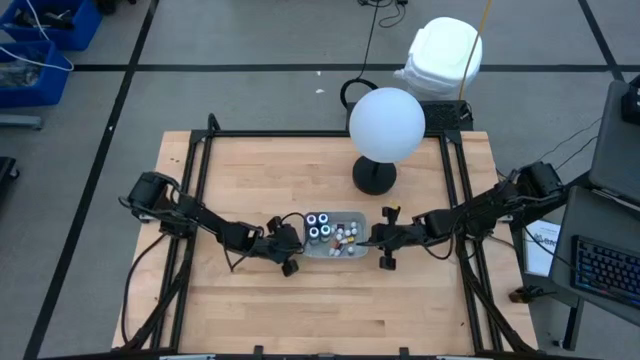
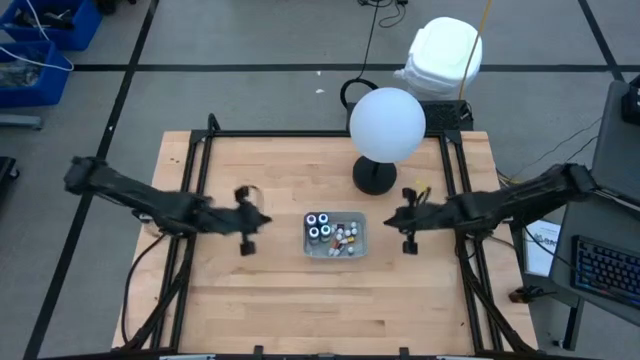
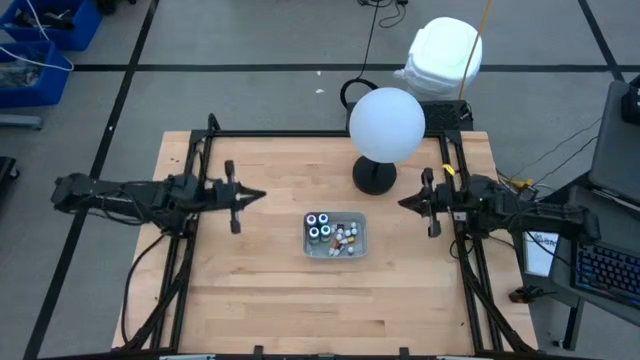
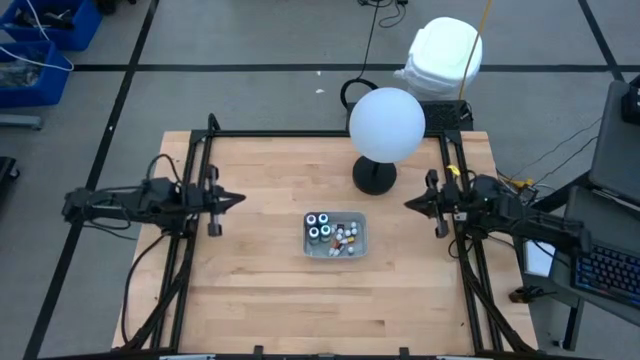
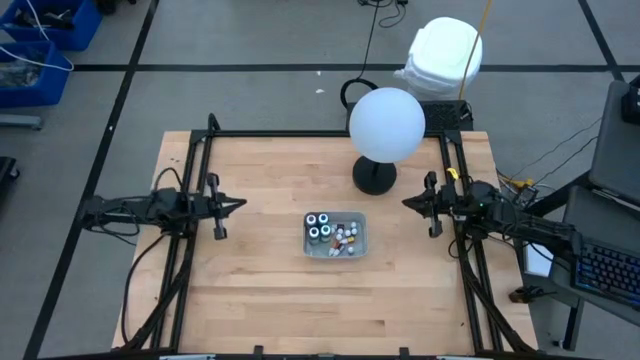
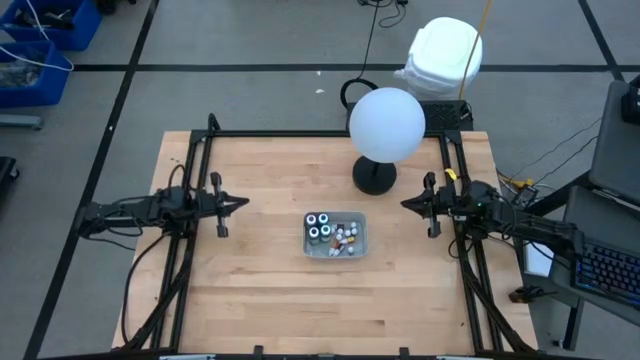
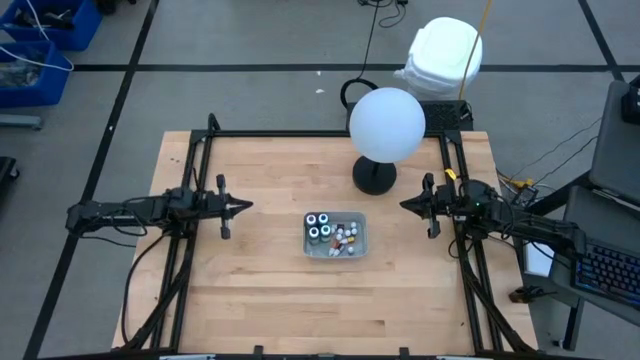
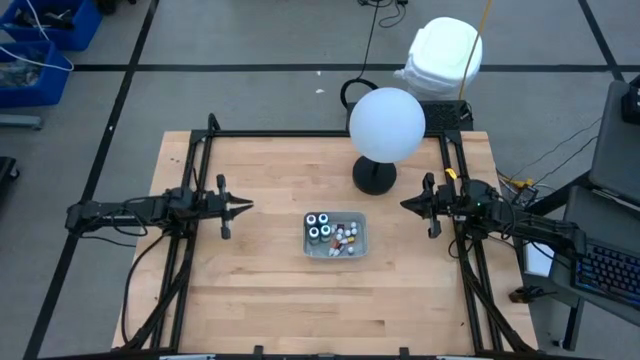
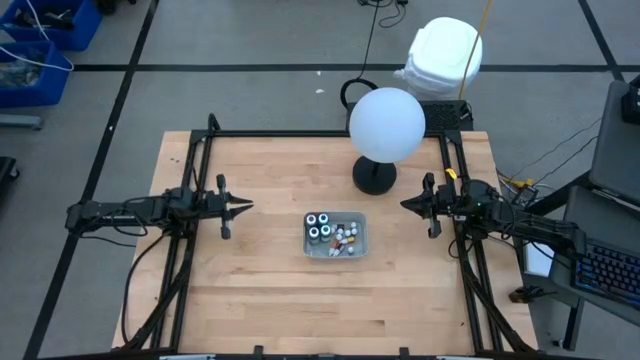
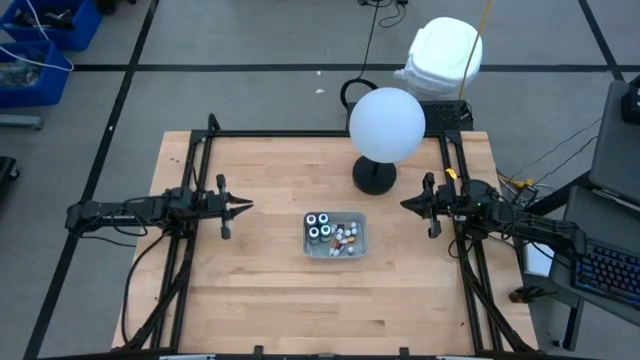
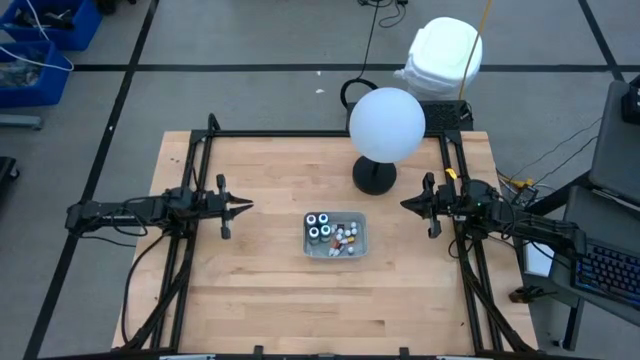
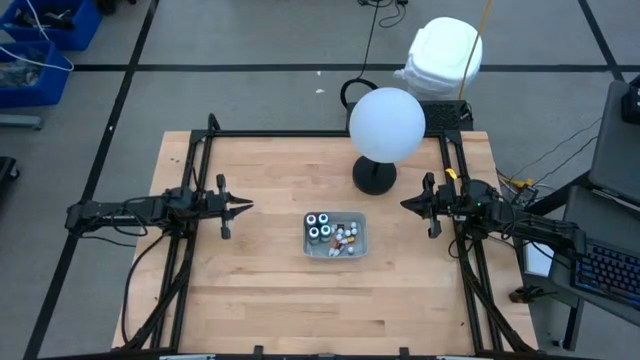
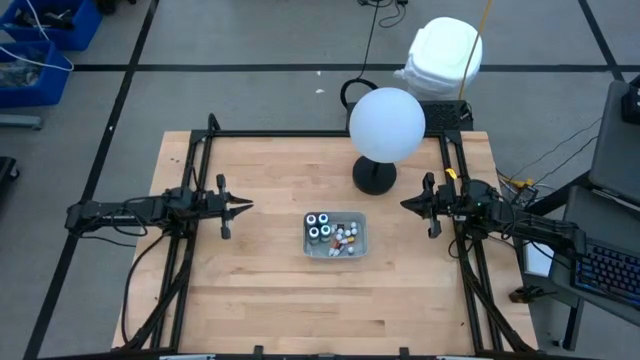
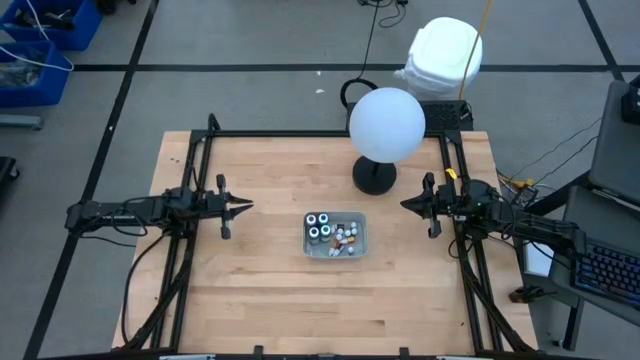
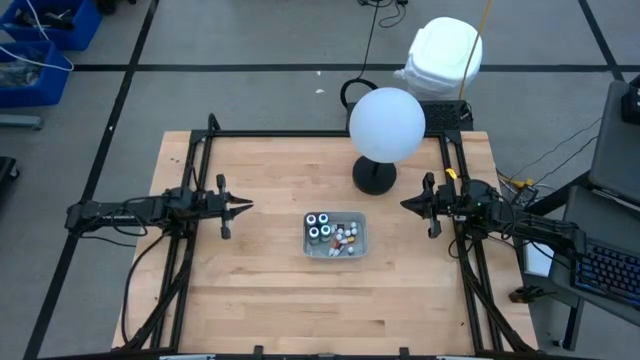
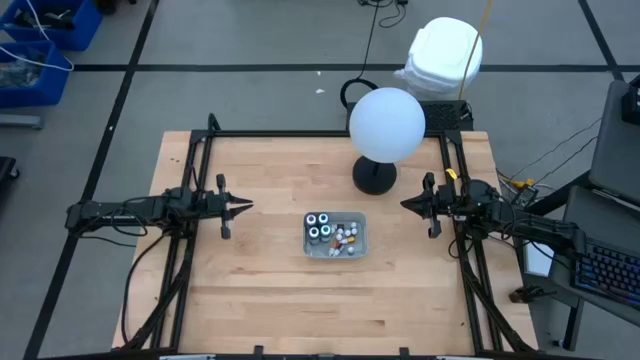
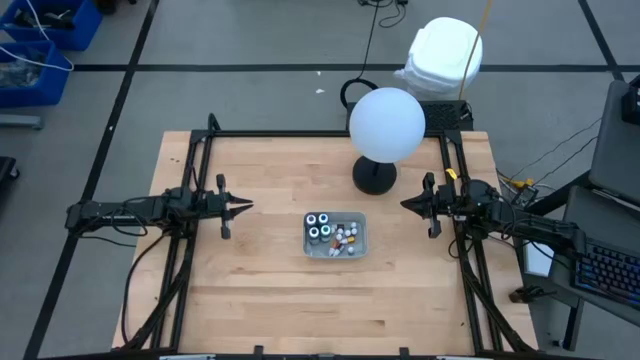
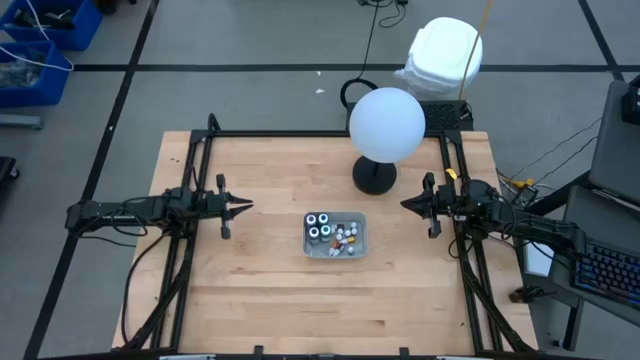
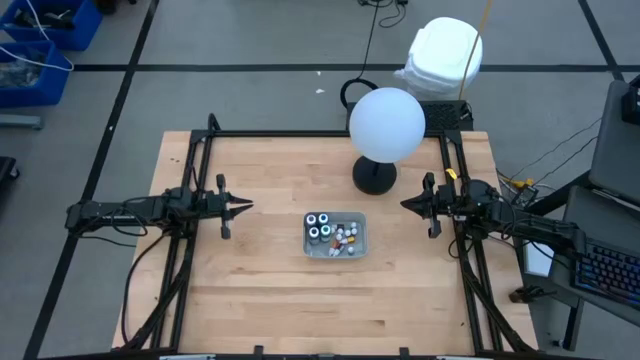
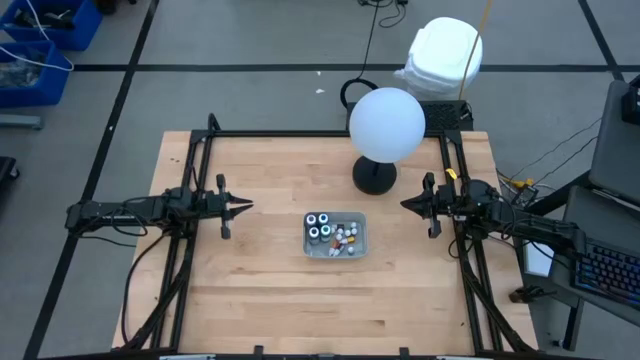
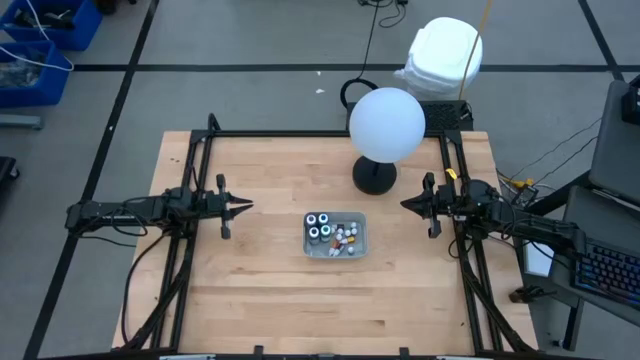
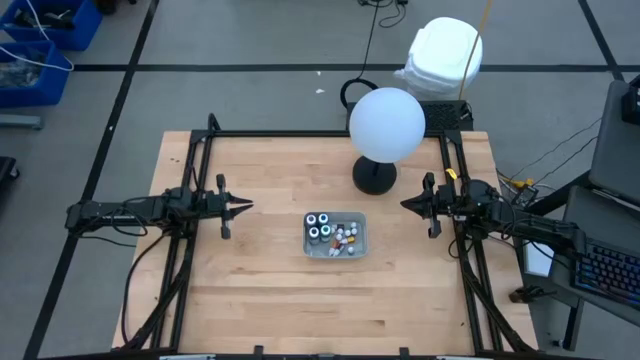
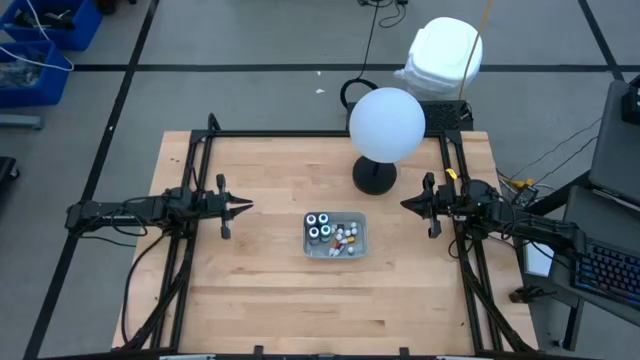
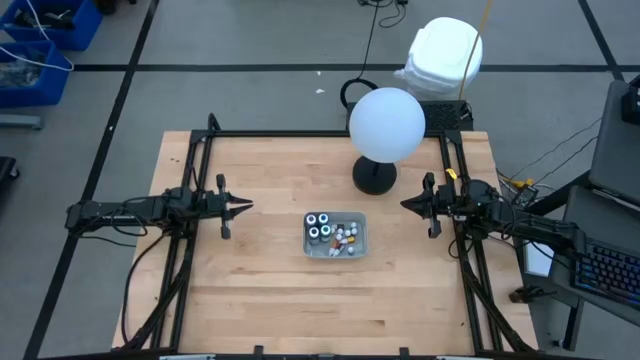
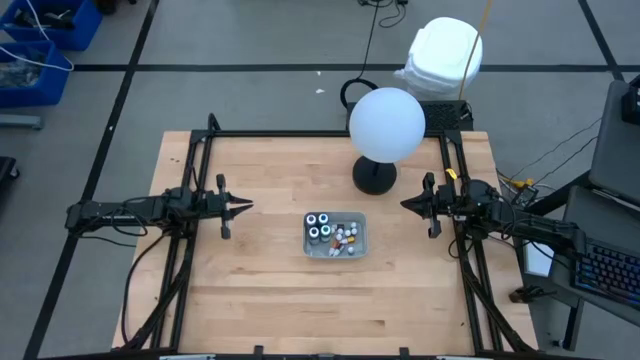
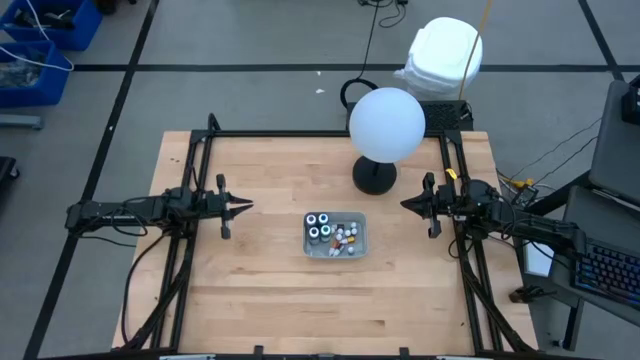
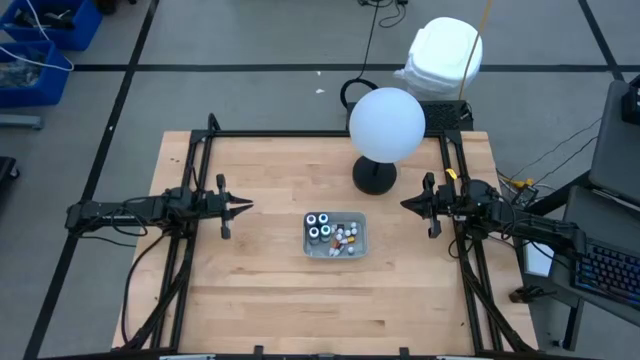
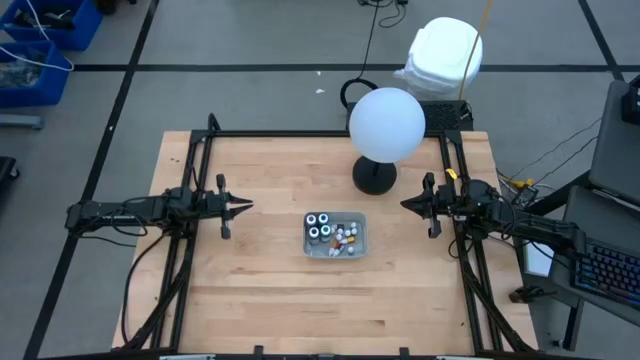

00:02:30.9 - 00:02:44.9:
Task: Pick & Place food coloring
Return to Home Position

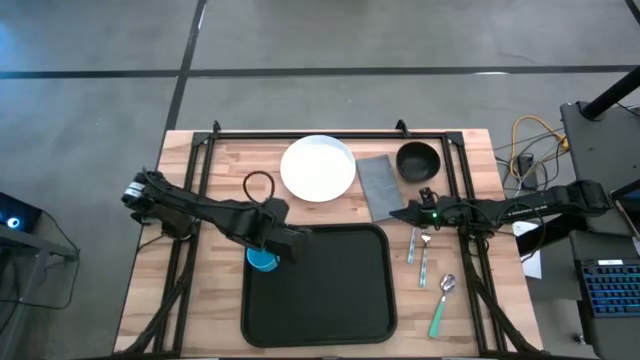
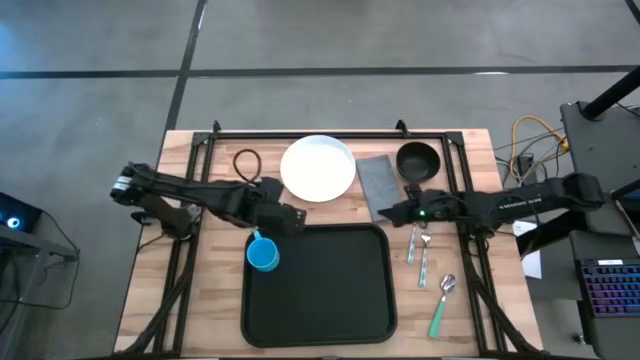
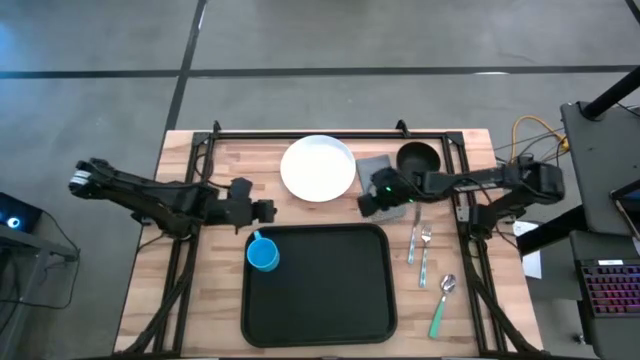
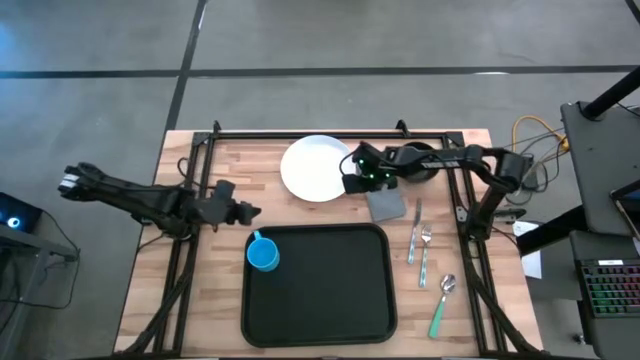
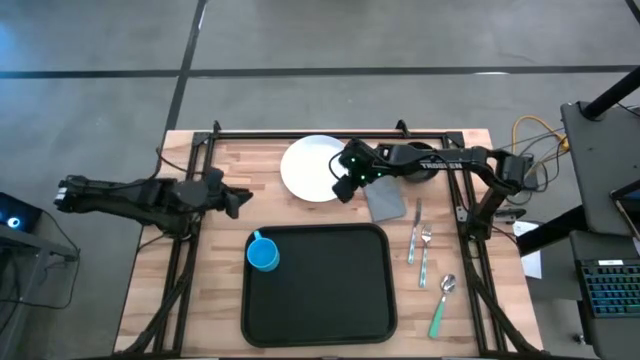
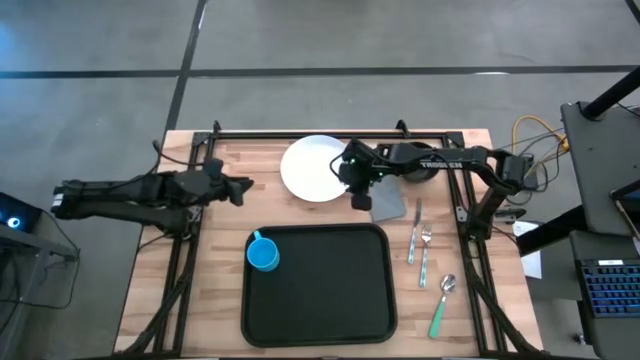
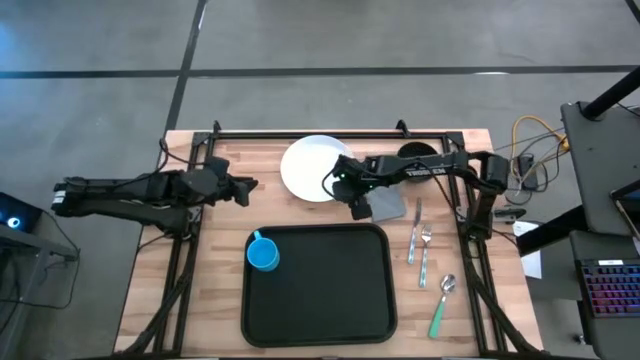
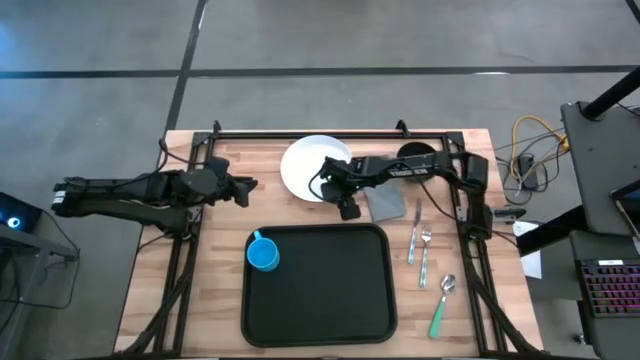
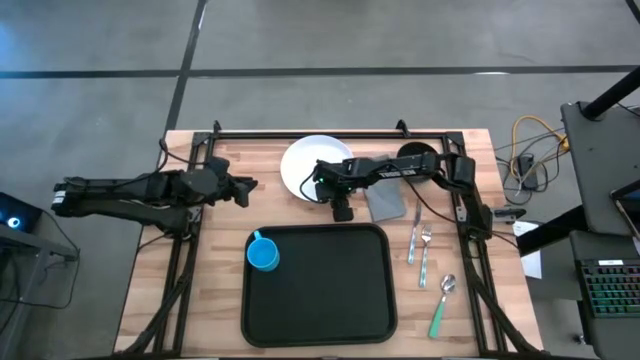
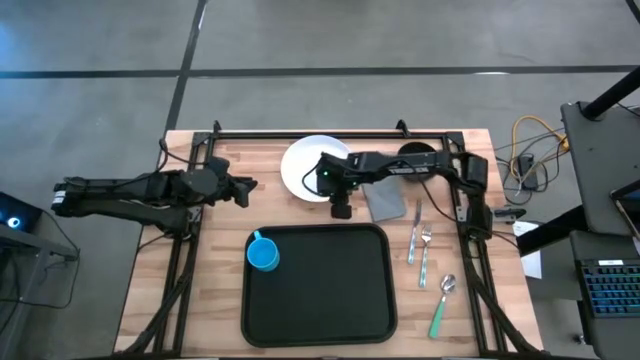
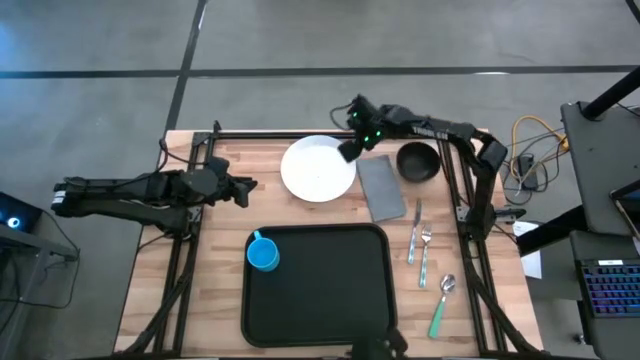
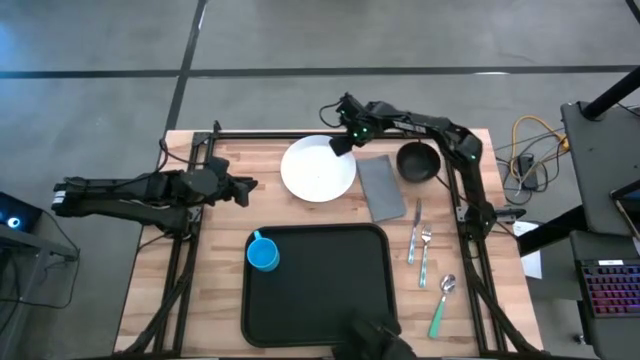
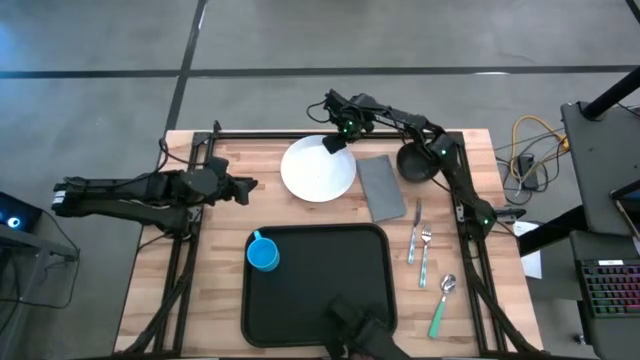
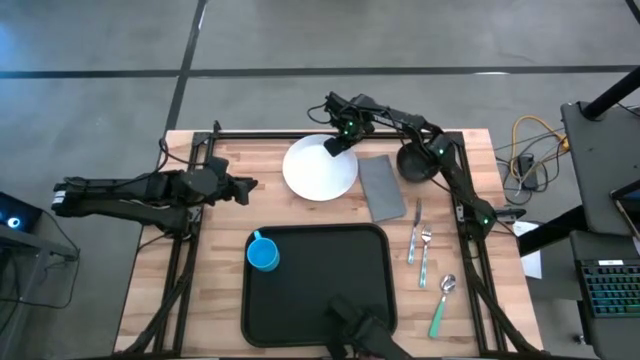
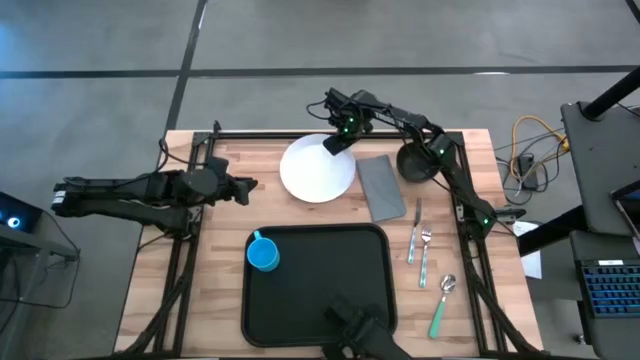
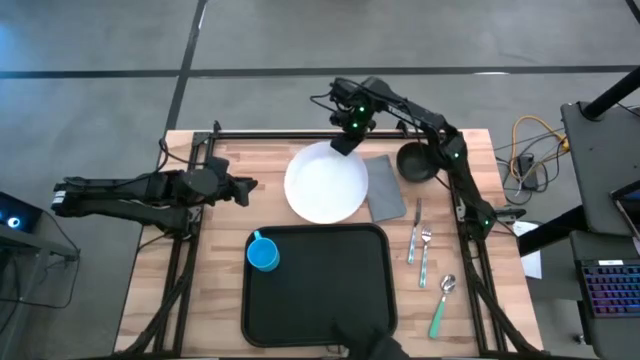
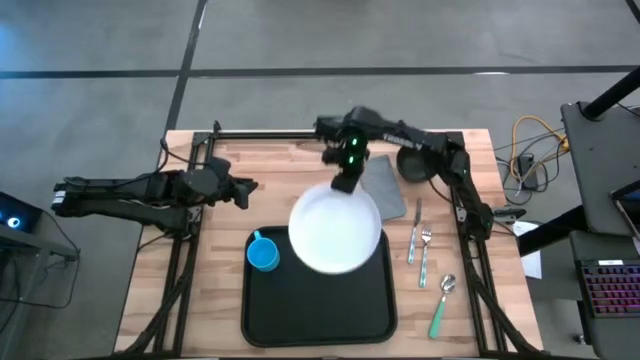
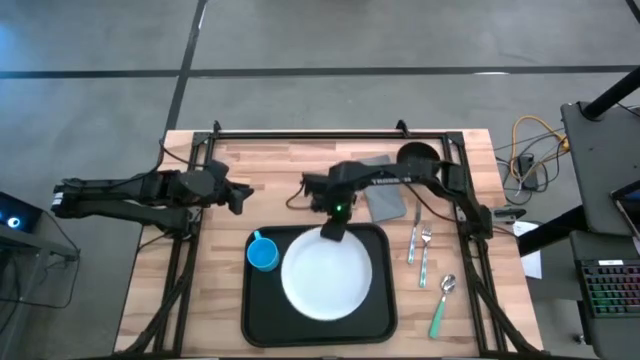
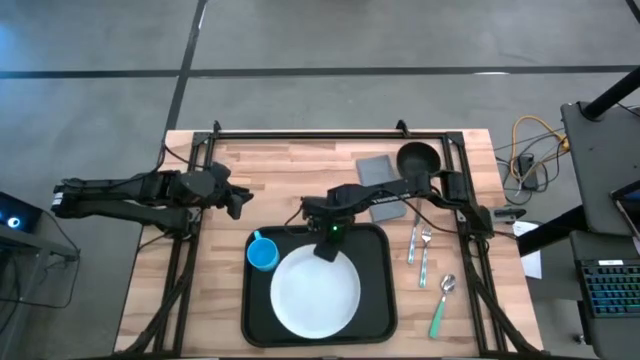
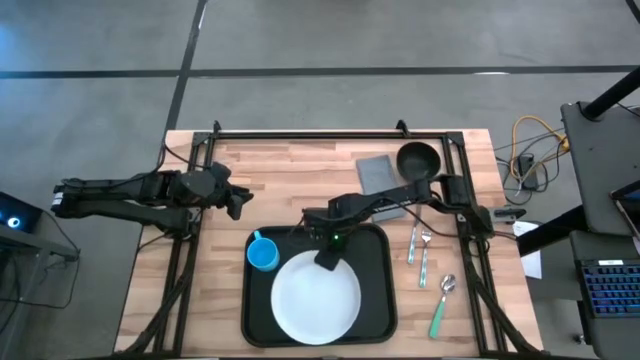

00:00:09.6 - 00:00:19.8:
Task: Set up tray
Put the white plate at the bottom of the black tray
